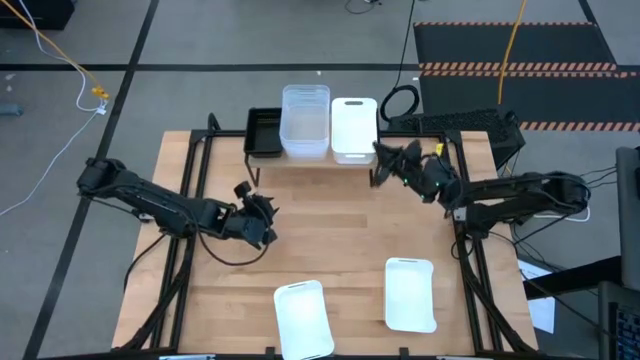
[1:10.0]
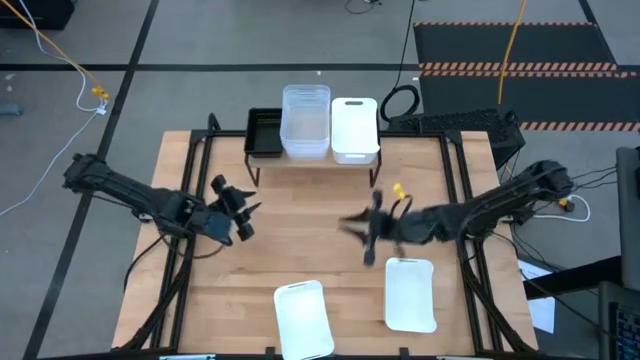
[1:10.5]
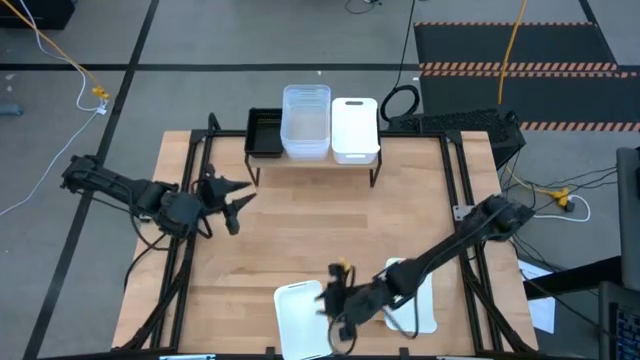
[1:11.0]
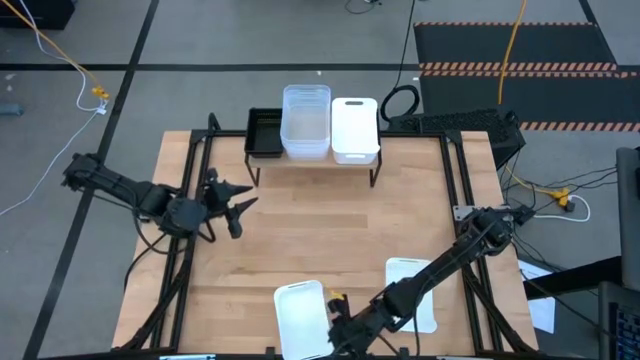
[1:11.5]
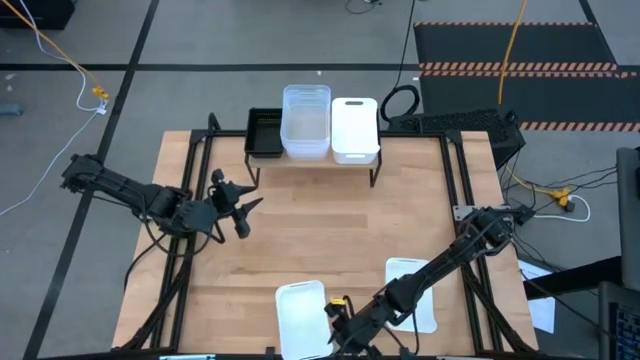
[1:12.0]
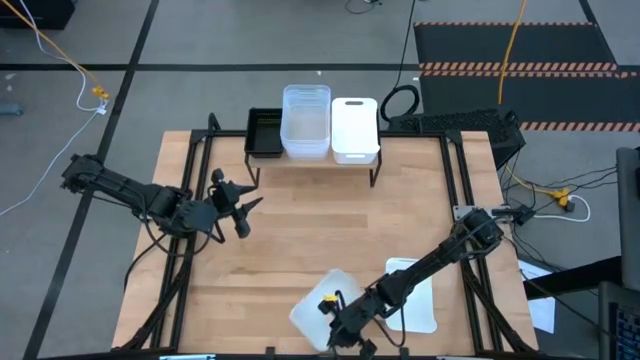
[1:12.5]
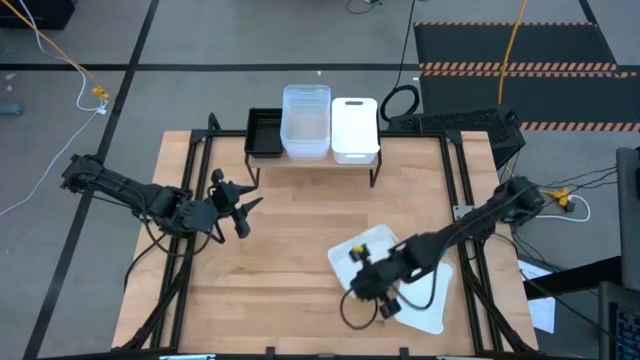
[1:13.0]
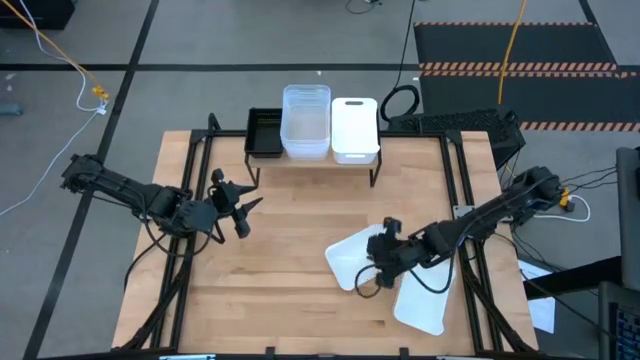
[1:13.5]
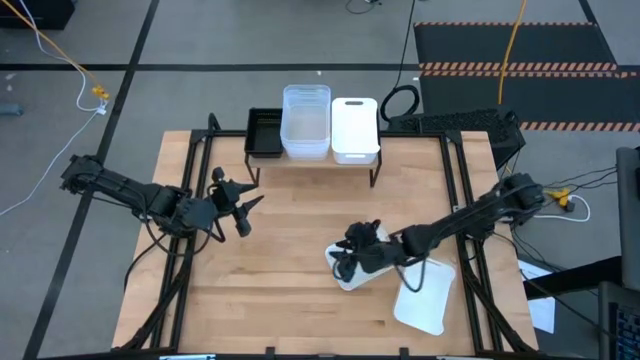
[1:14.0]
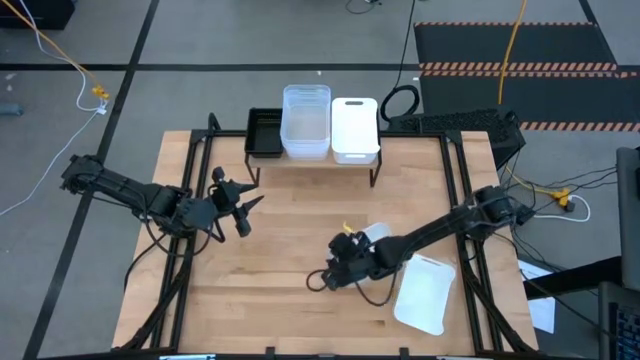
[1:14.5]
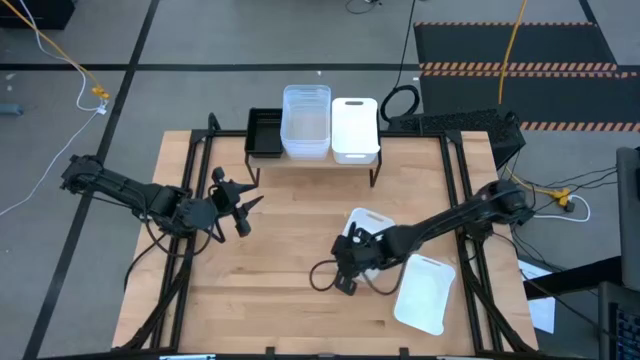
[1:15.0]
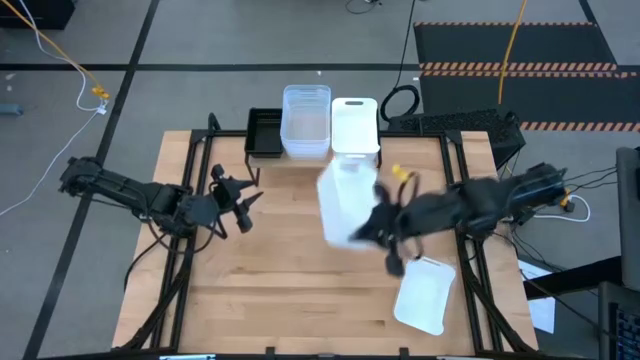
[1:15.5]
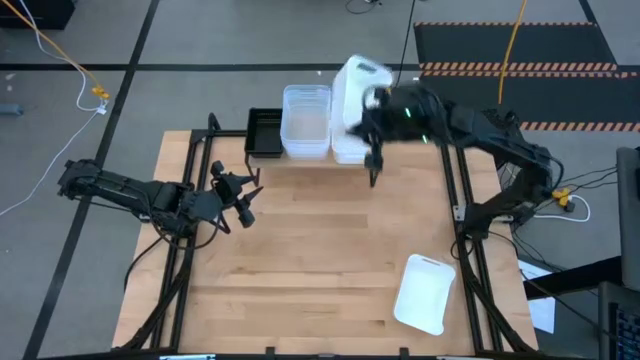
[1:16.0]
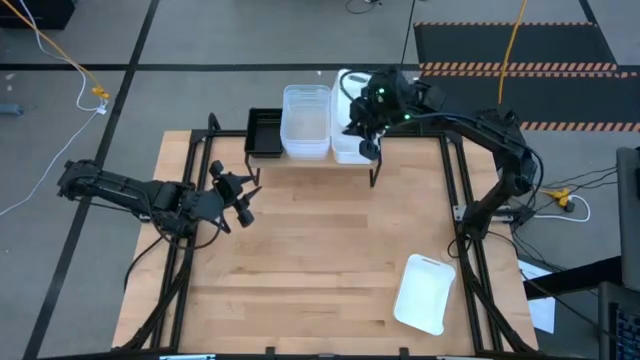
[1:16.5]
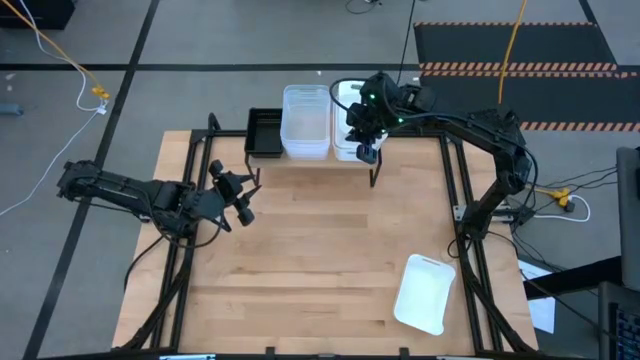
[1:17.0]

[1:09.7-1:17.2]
Task: Stack baskets on shelf by color
Stack the left white bin on top of the other white bin on the shelf

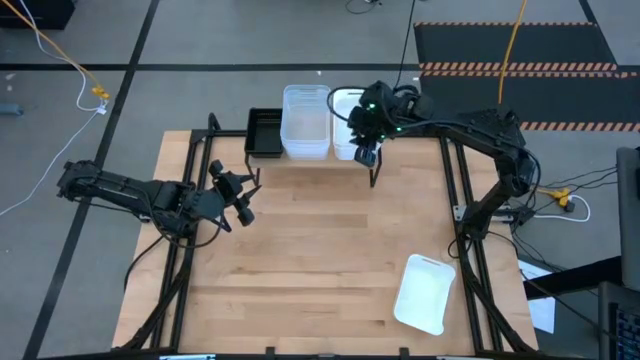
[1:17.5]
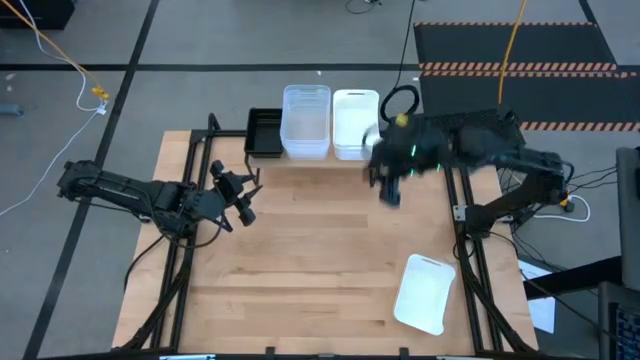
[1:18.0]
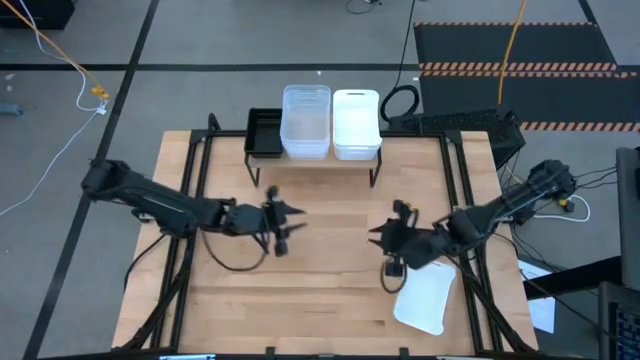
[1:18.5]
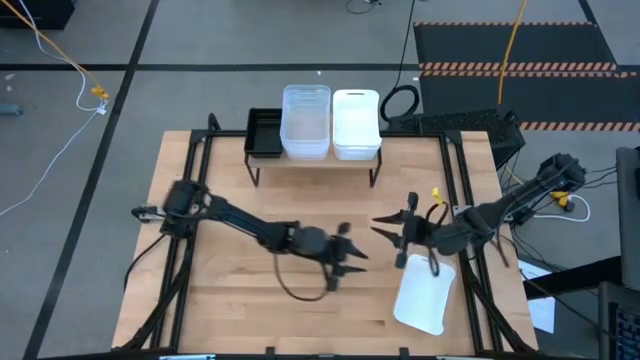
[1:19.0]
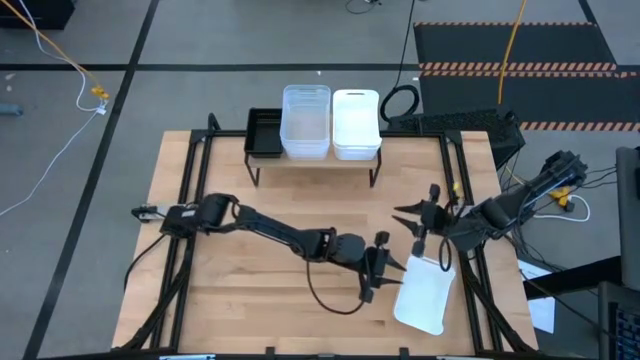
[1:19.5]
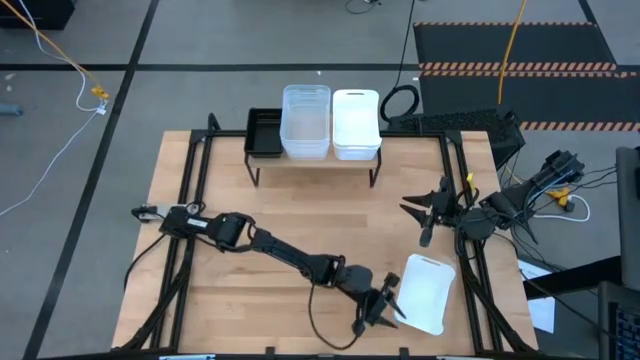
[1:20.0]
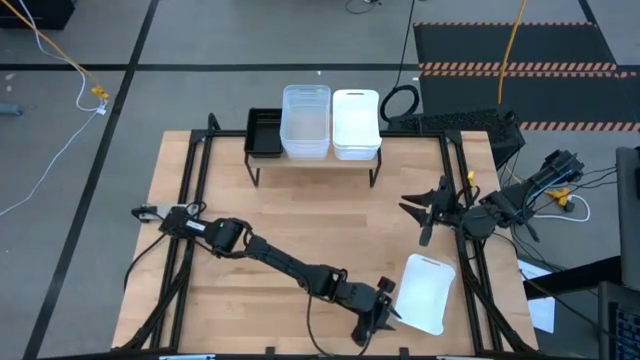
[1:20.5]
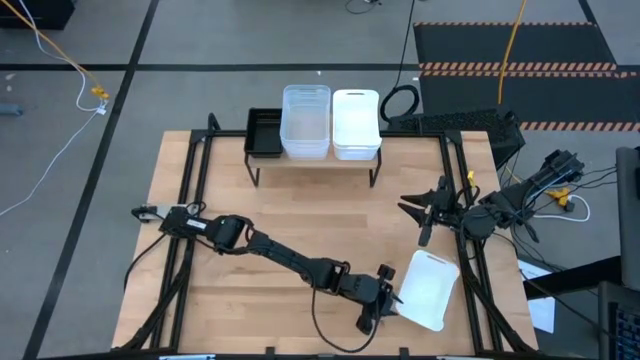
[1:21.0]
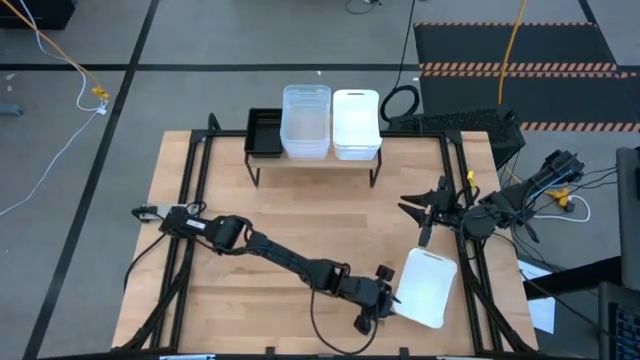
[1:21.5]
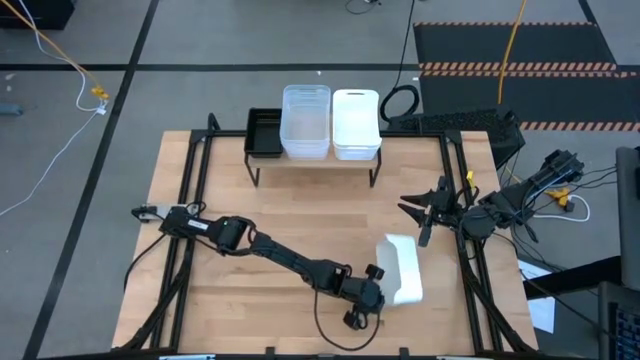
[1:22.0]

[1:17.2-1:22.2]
Stack the white bin on top of the other white bins on the shelf

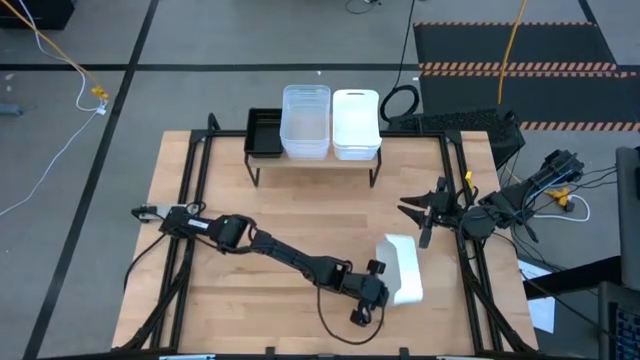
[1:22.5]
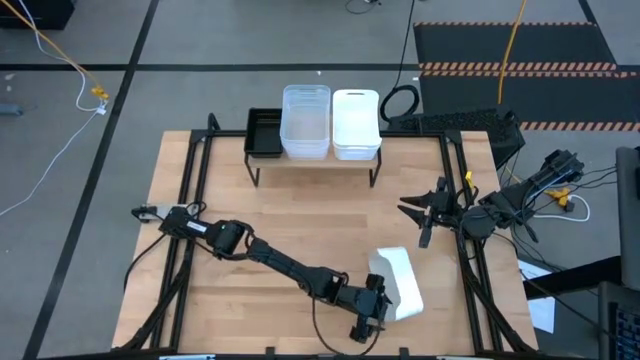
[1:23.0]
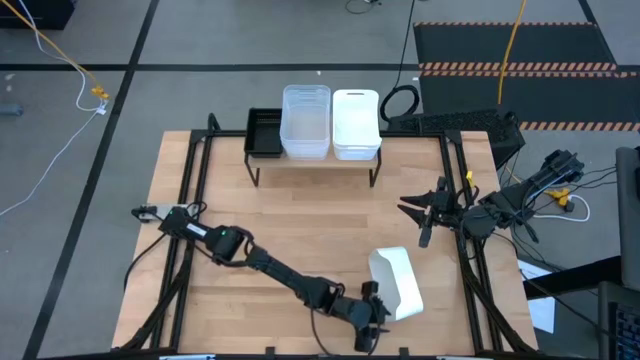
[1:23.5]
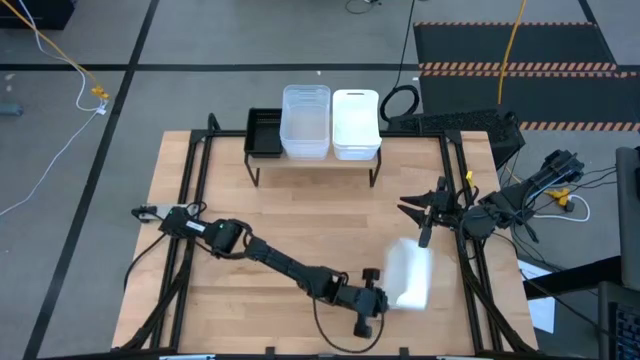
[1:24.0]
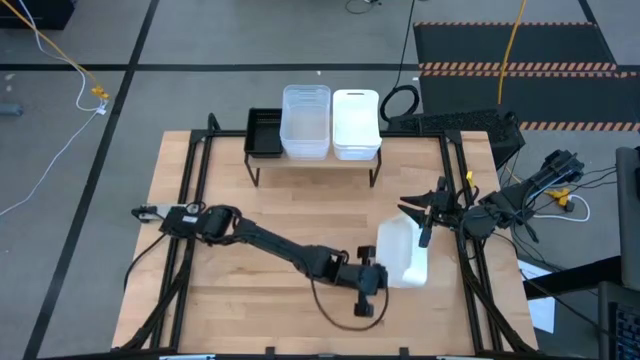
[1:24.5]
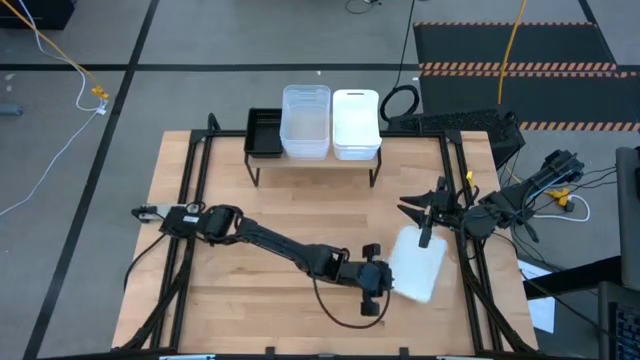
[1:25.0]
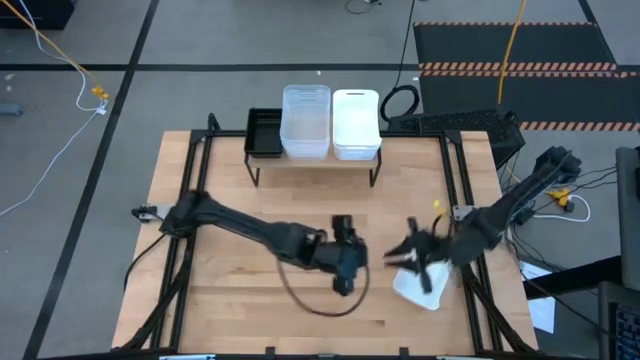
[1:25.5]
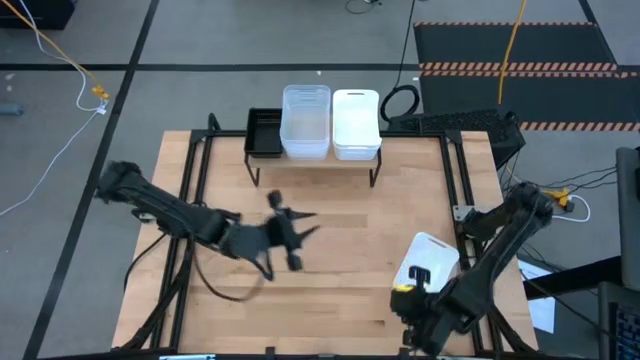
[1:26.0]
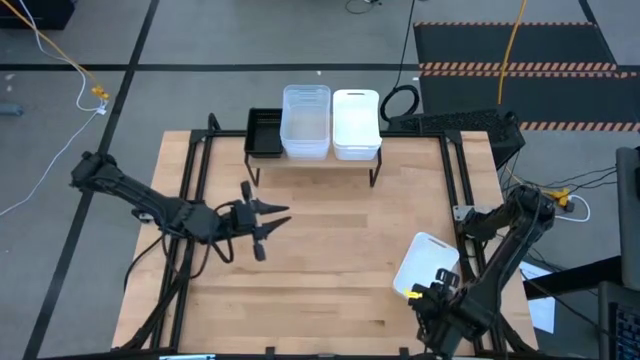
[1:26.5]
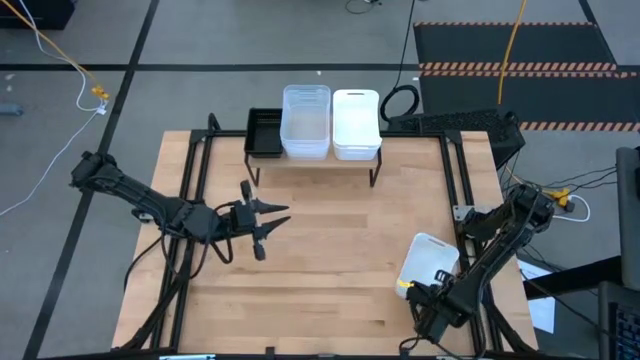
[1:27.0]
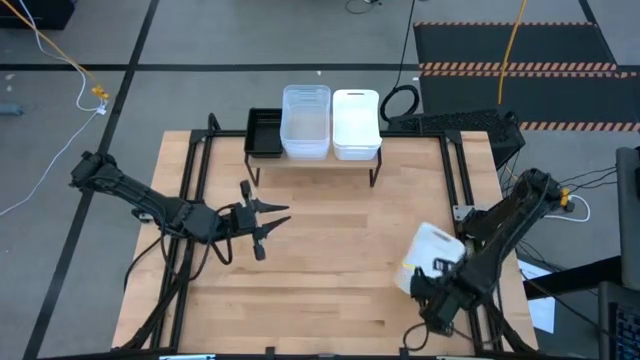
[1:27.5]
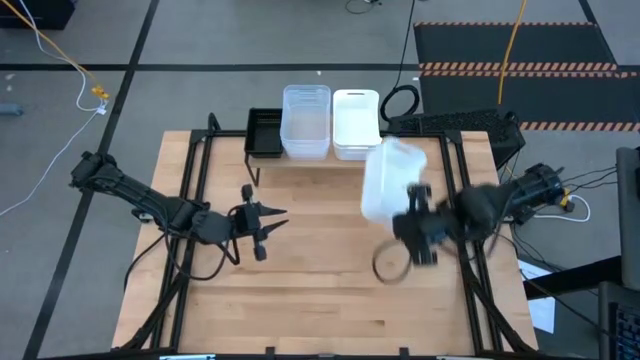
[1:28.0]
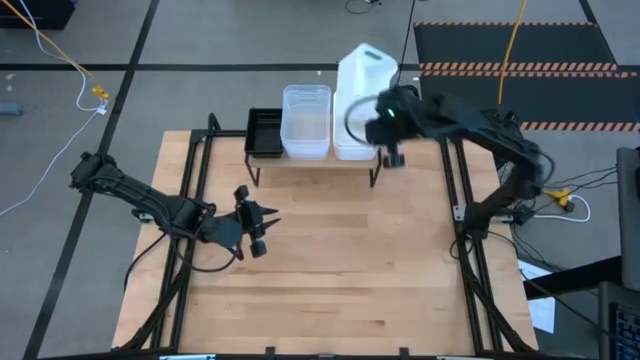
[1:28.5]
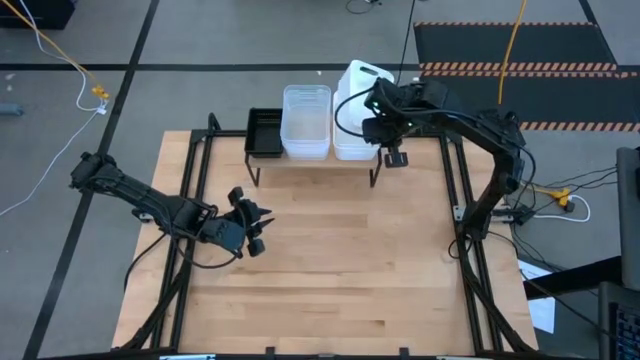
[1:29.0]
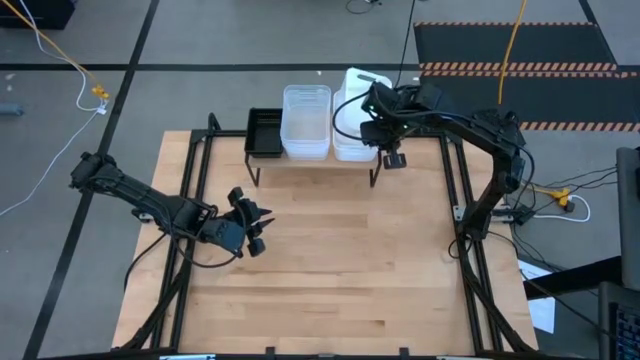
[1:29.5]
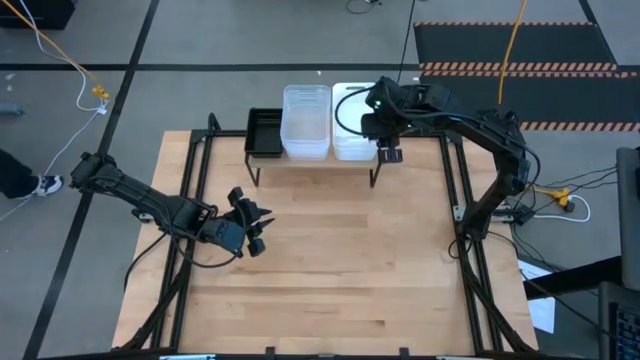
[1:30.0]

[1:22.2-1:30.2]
Stack the white bin on top of the other white bins on the shelf
